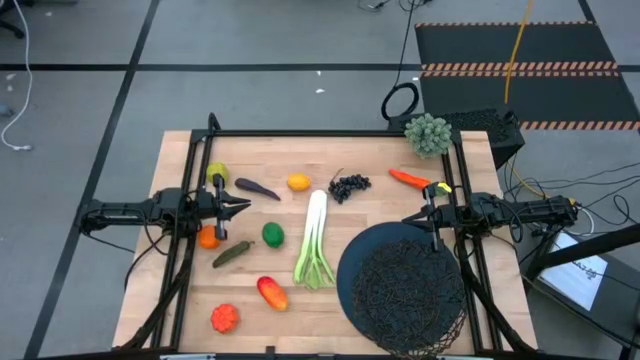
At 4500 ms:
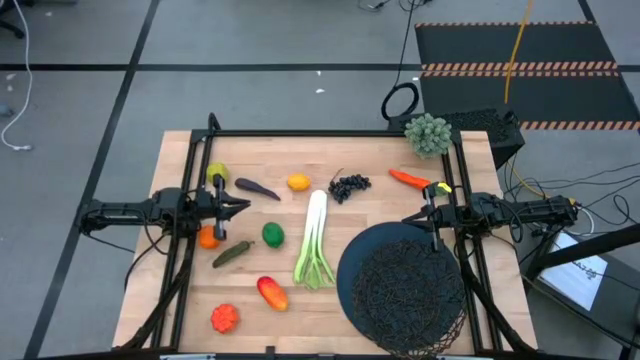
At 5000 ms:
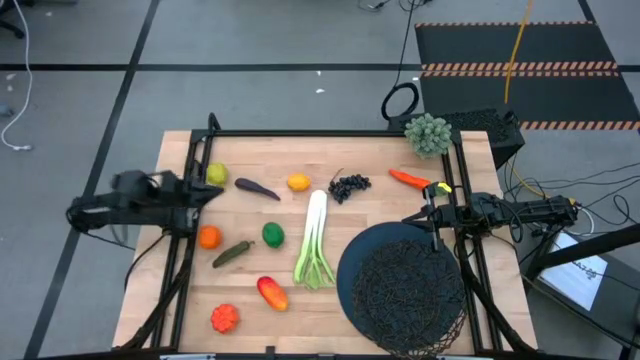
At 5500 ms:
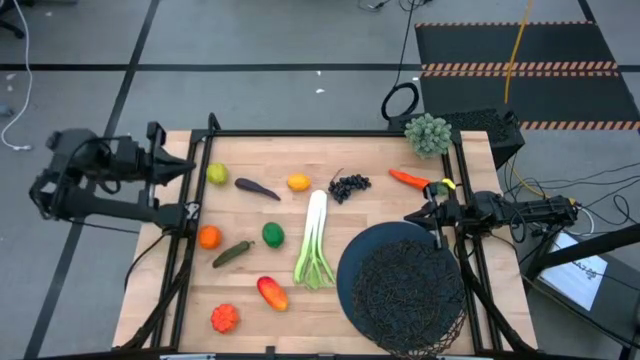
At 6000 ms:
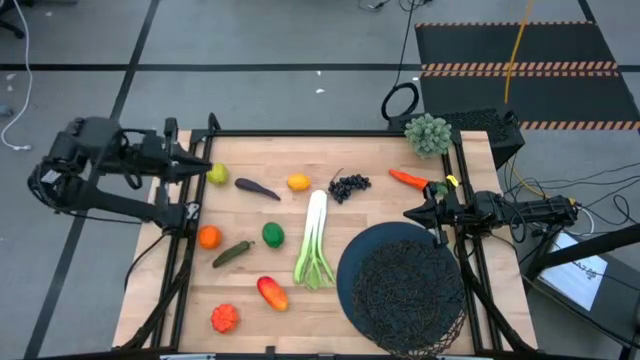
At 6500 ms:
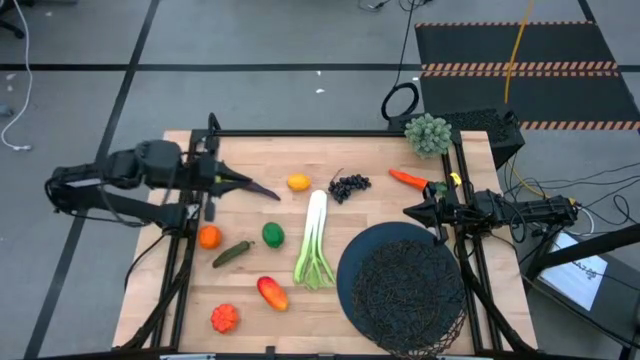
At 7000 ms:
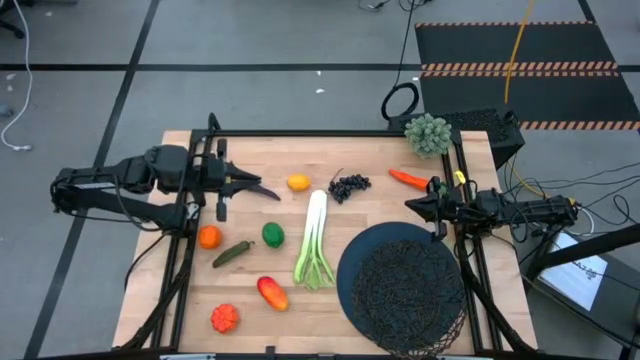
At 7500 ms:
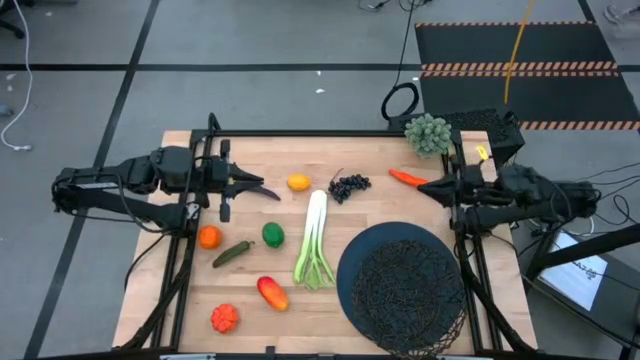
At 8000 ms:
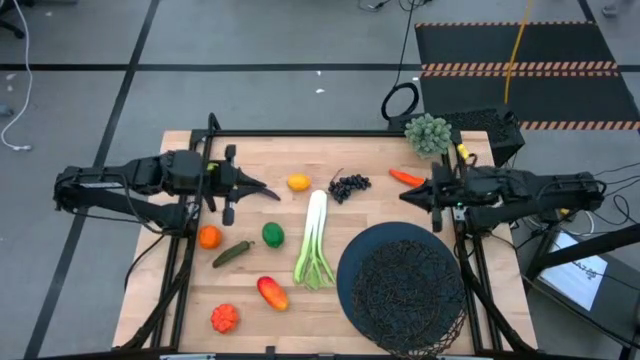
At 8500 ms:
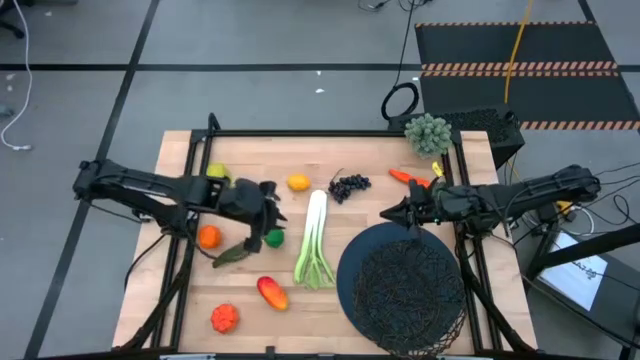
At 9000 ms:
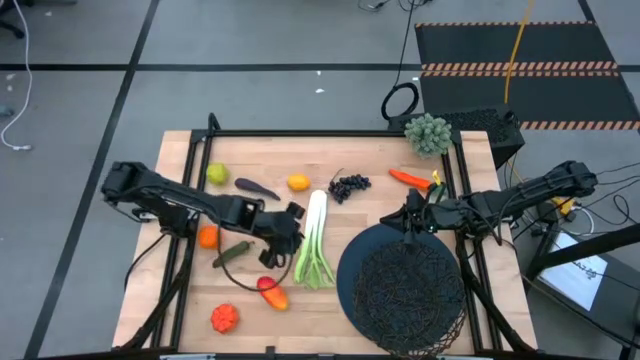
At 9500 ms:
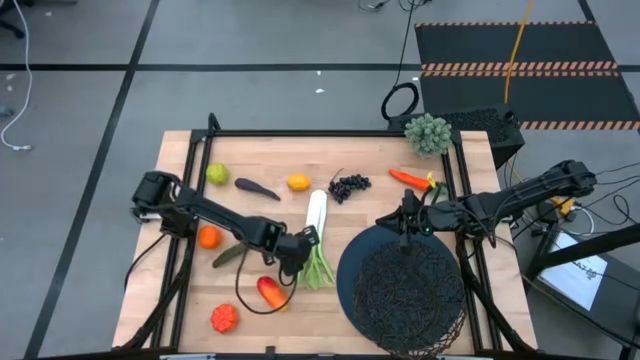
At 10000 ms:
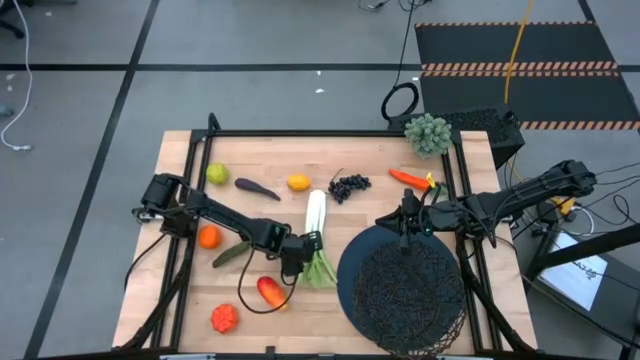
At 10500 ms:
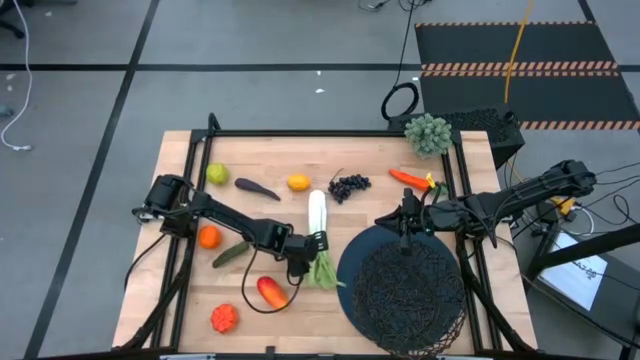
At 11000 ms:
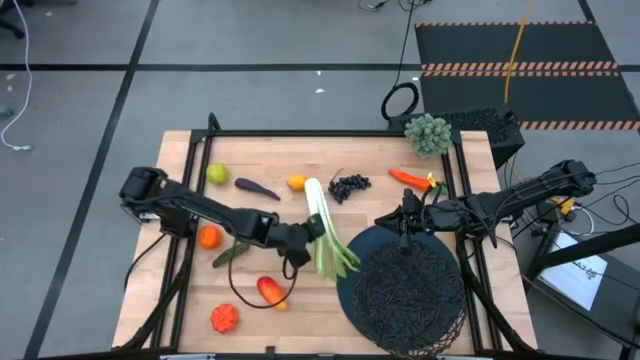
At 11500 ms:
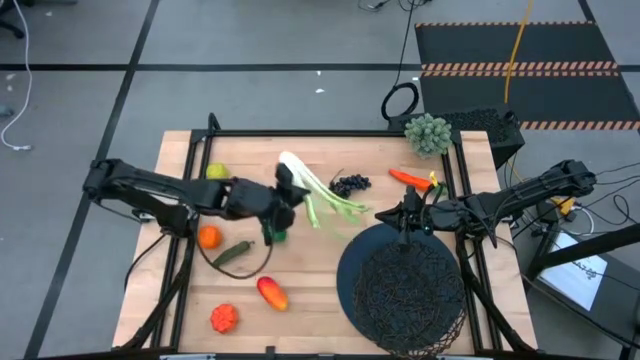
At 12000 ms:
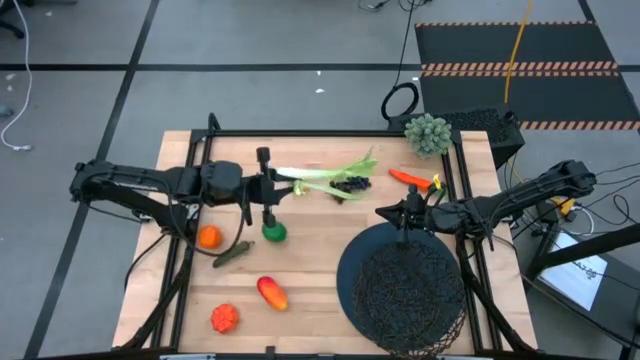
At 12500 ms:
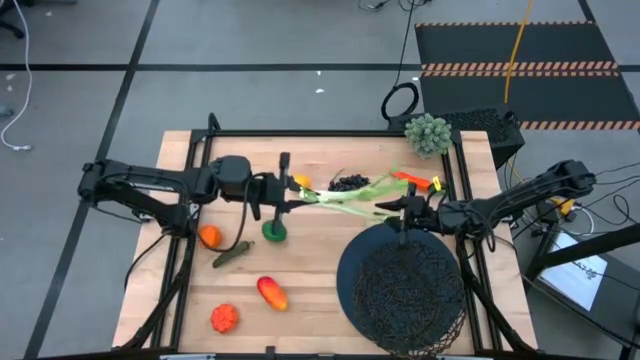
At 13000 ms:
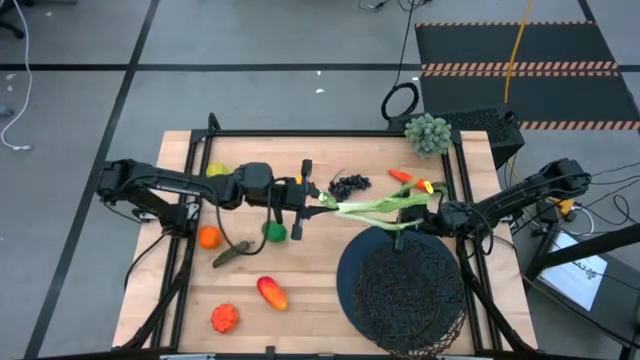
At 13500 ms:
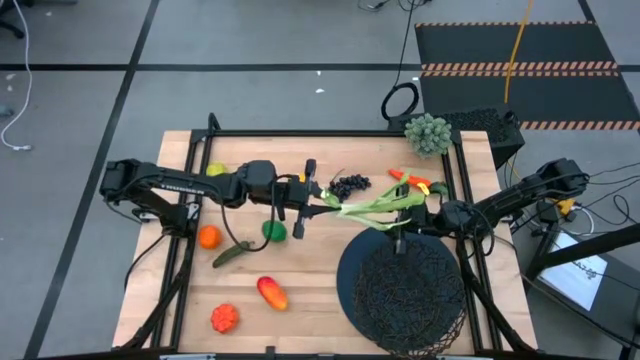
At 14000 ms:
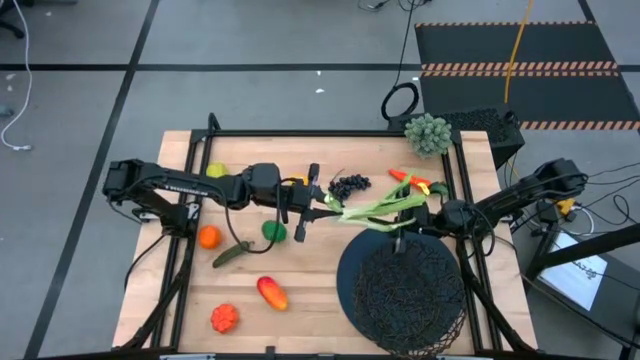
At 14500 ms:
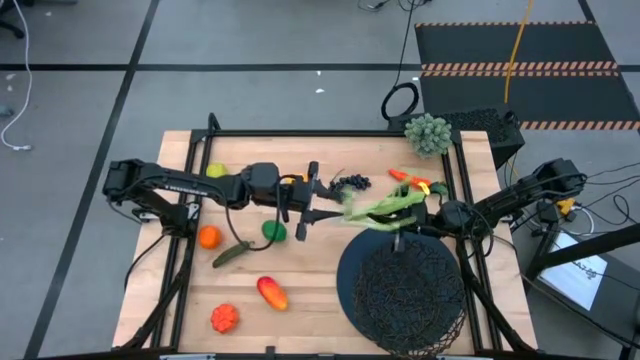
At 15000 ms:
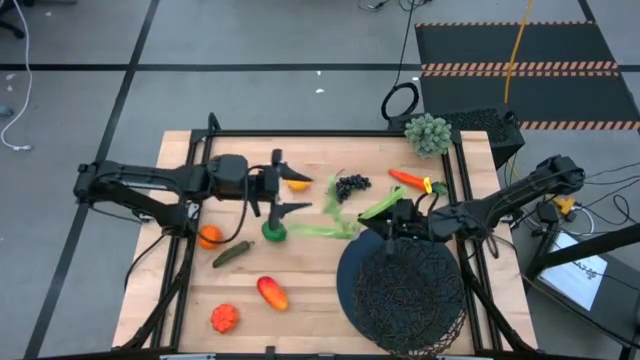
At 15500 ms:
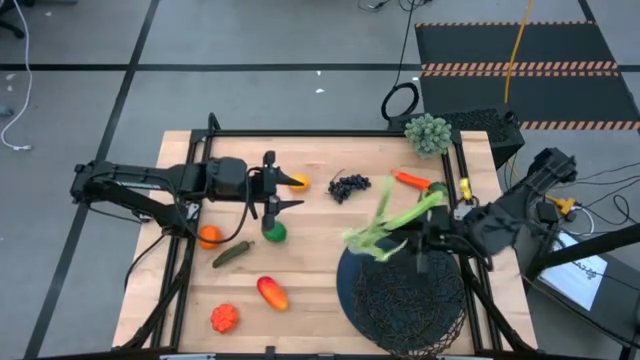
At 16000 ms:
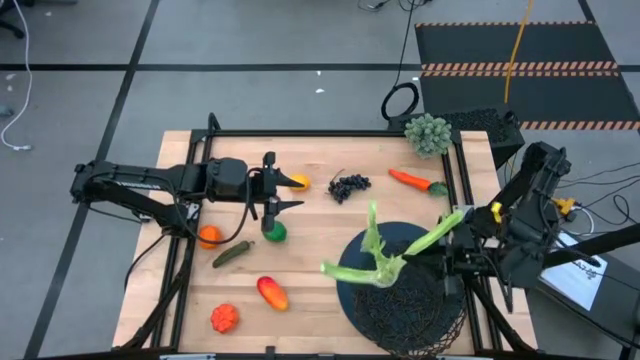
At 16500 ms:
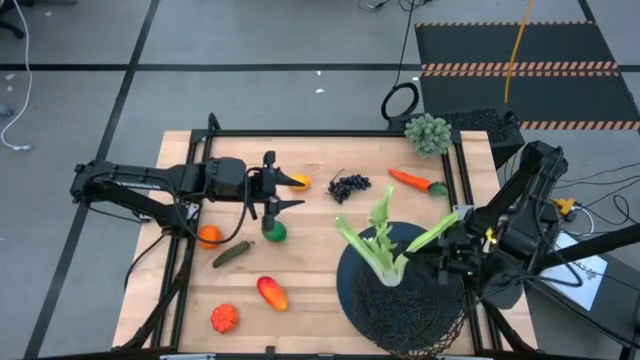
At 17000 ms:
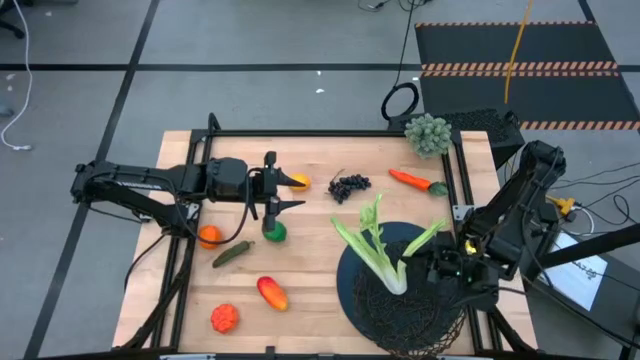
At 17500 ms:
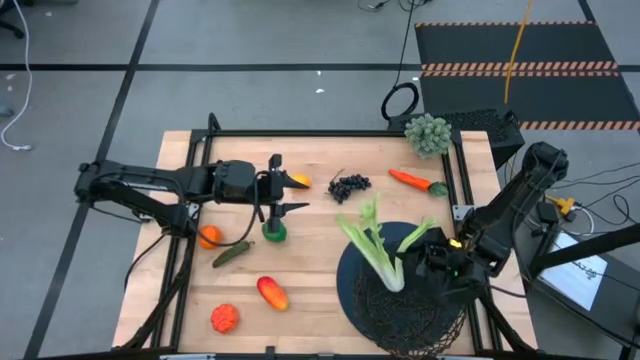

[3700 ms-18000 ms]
Task: Build produce basket
Put the celery into the wire basket

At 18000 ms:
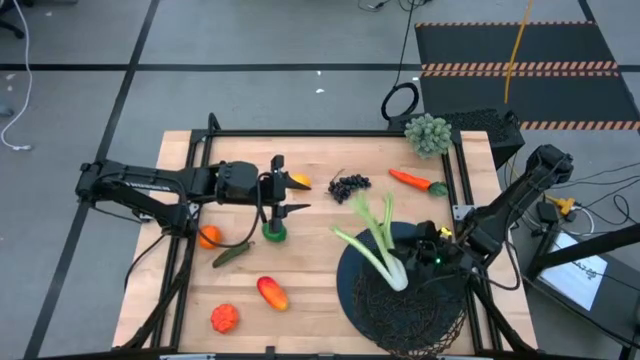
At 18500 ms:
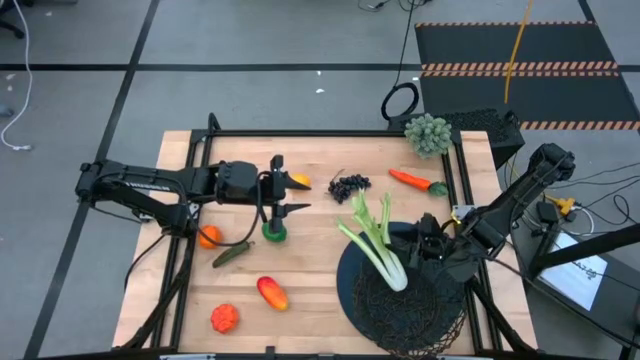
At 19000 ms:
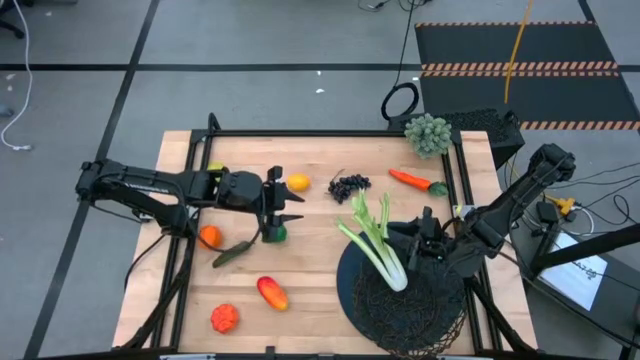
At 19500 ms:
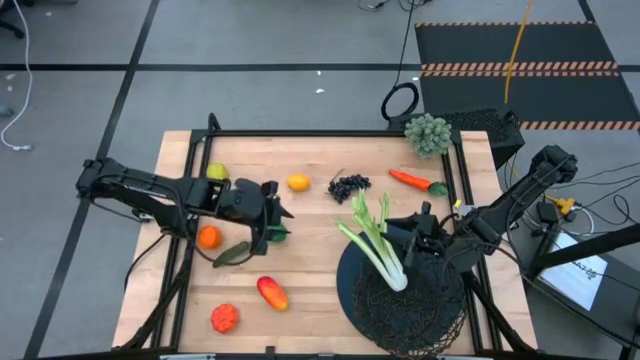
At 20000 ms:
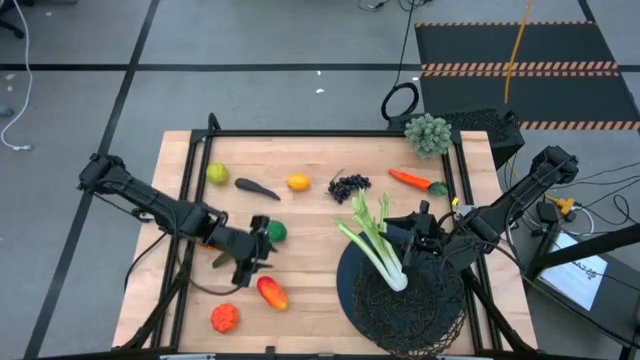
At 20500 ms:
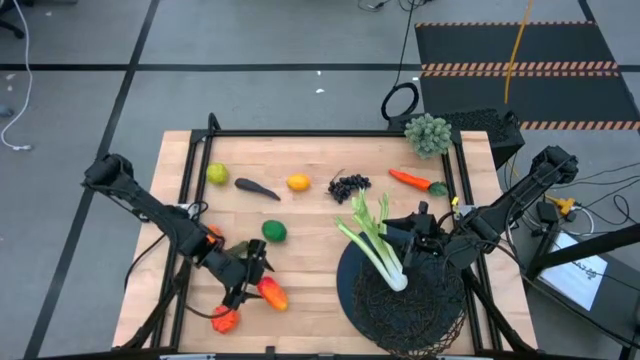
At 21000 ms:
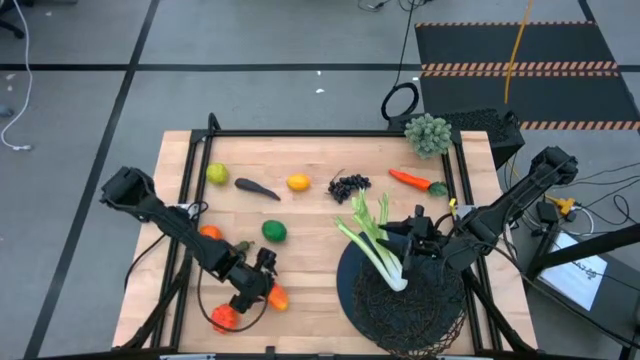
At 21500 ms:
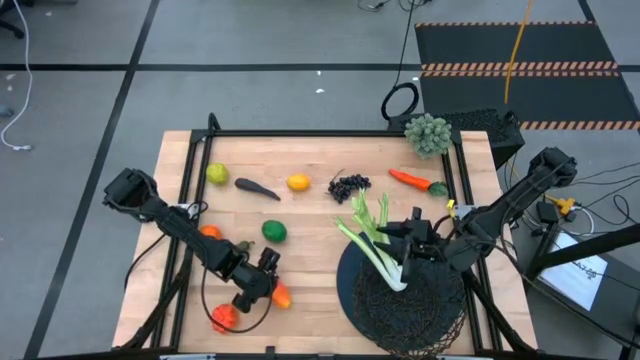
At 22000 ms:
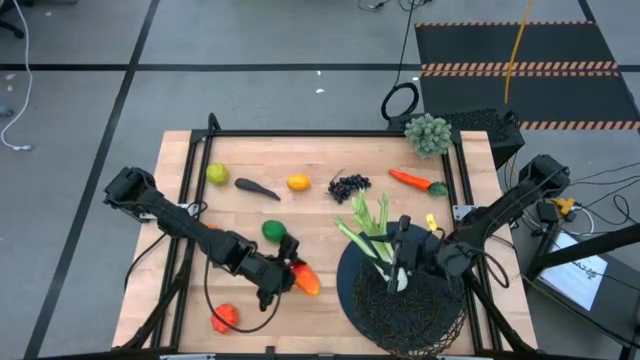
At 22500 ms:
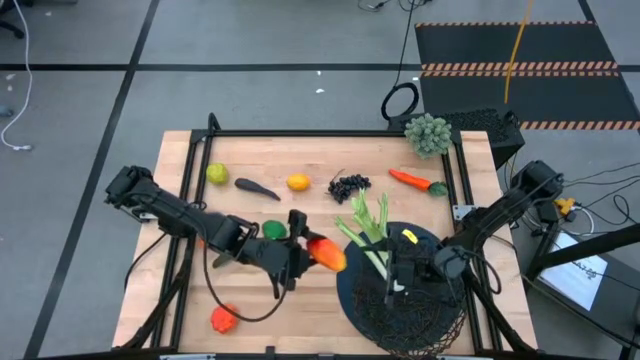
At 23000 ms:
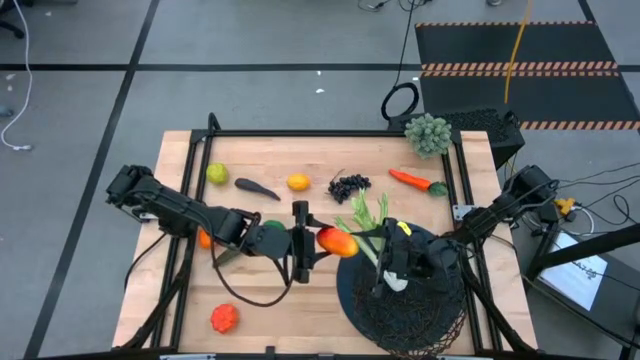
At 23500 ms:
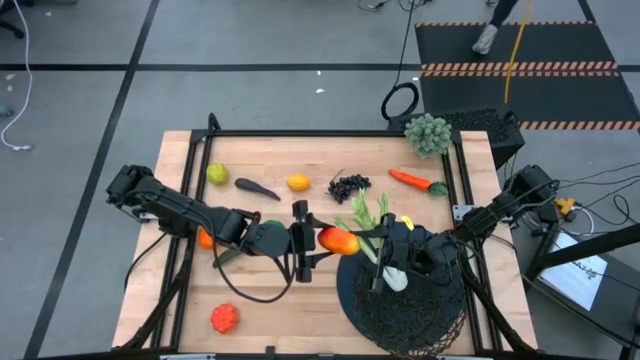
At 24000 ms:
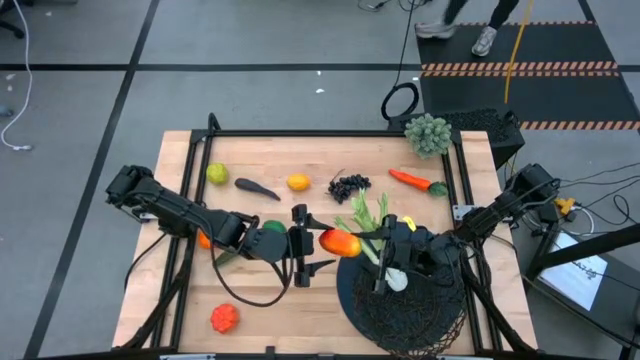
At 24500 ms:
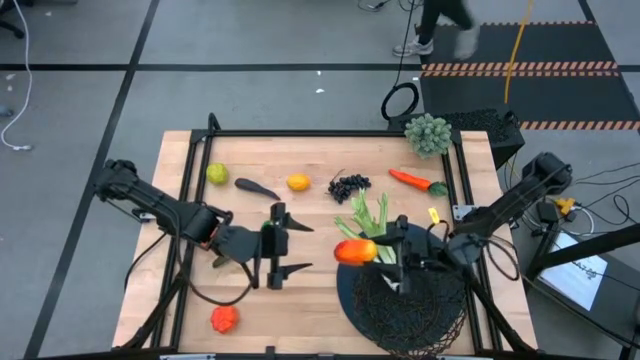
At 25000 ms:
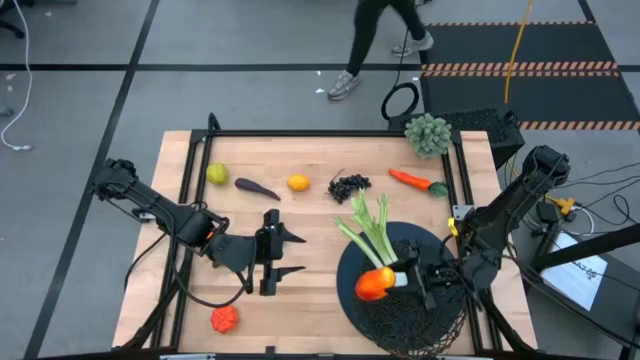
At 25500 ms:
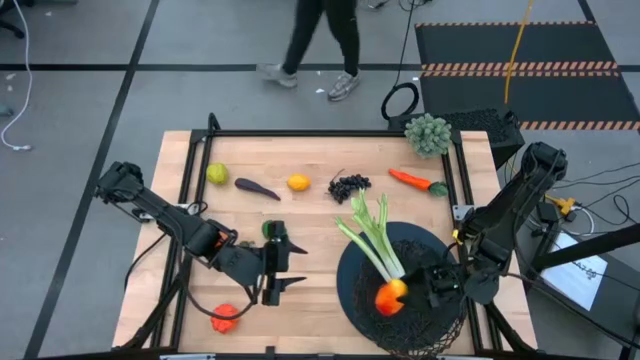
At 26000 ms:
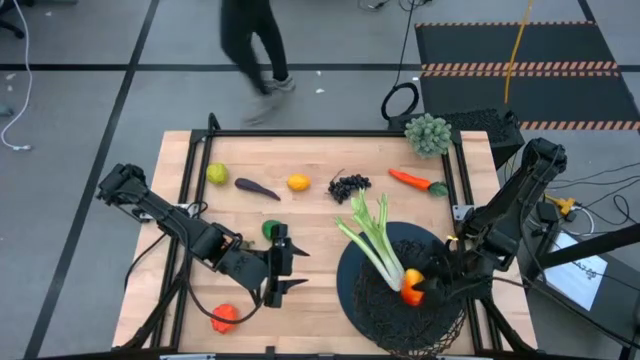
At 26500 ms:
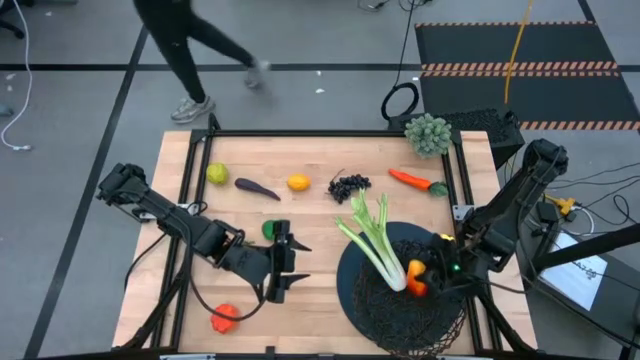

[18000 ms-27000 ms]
Put the mango into the wire basket
